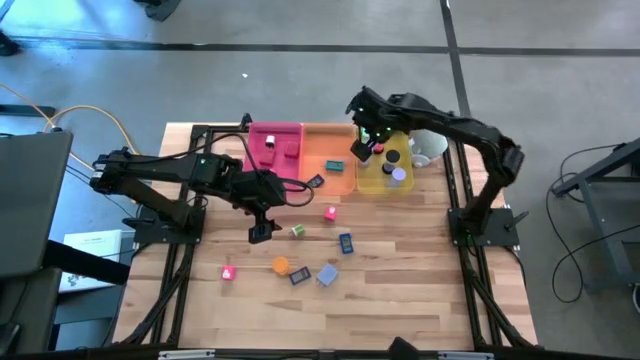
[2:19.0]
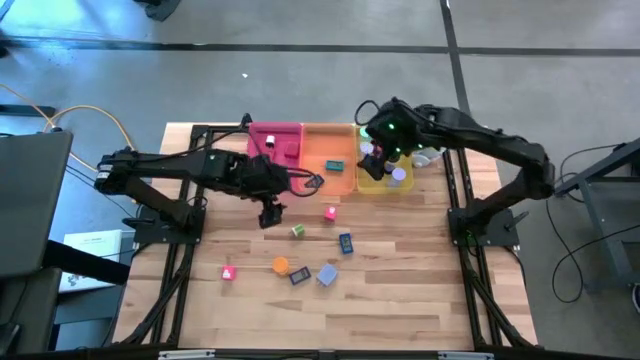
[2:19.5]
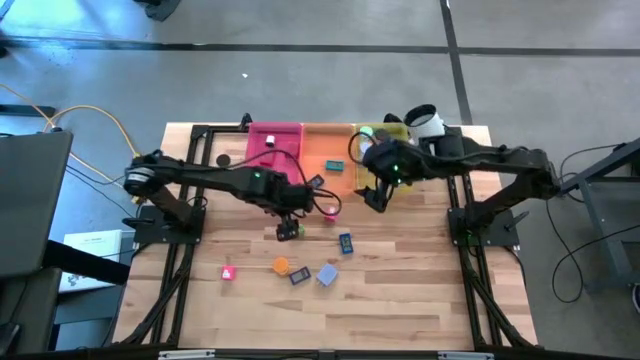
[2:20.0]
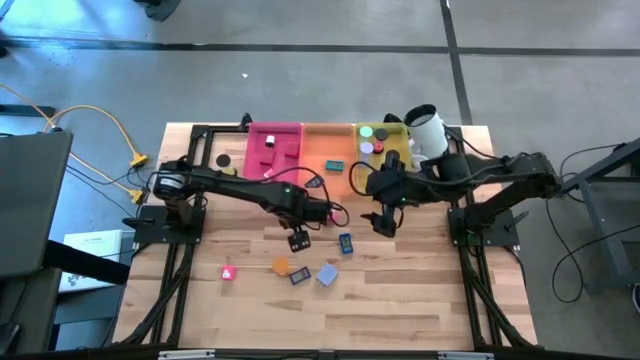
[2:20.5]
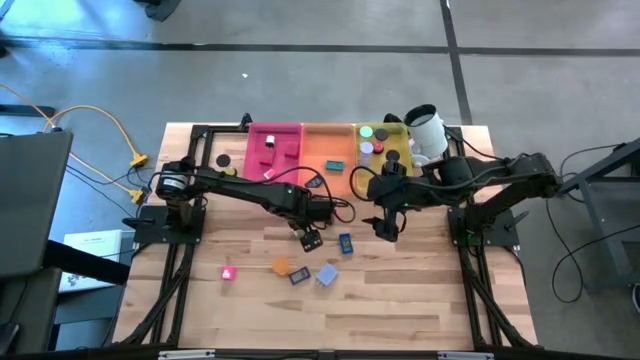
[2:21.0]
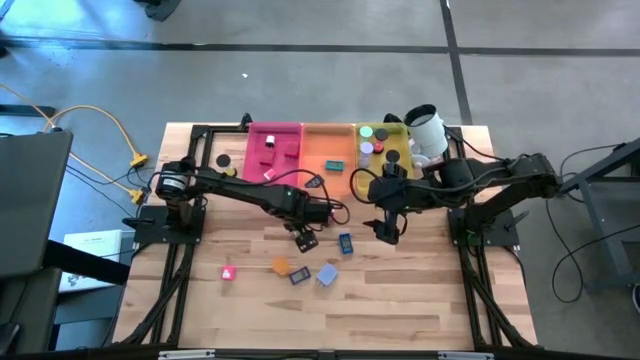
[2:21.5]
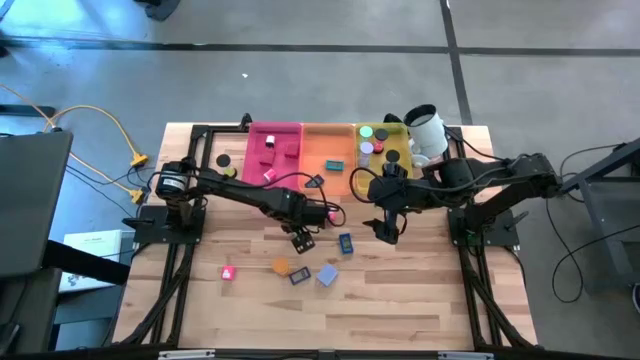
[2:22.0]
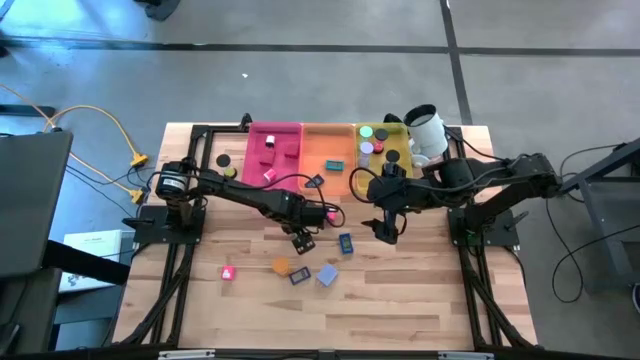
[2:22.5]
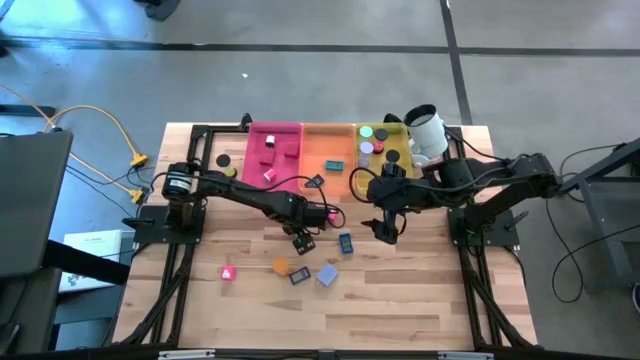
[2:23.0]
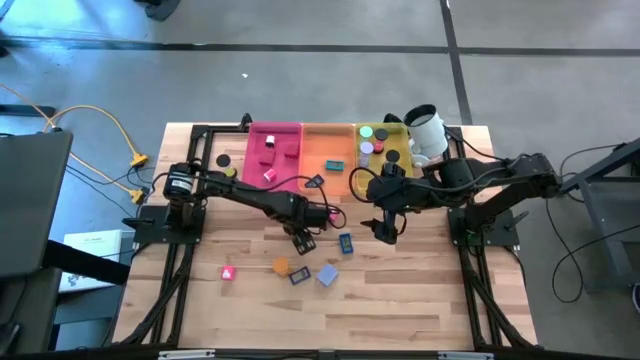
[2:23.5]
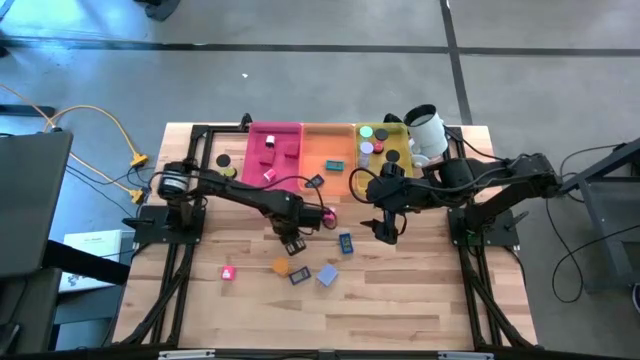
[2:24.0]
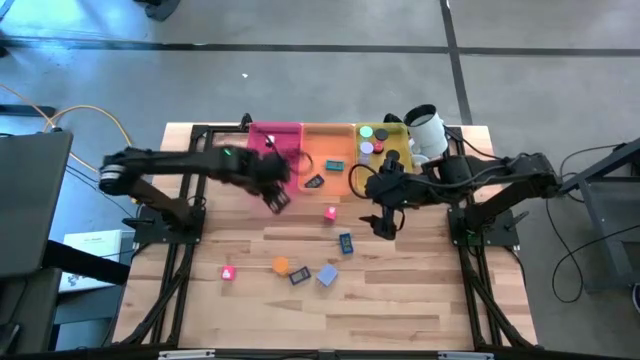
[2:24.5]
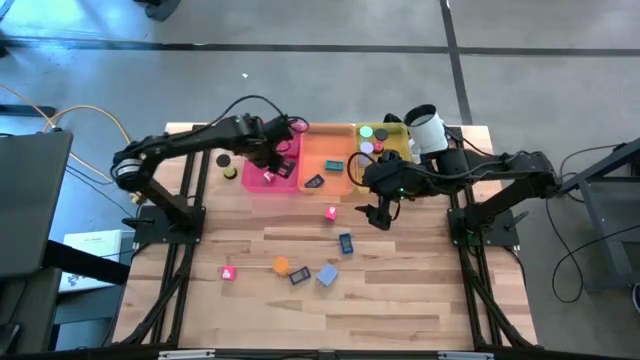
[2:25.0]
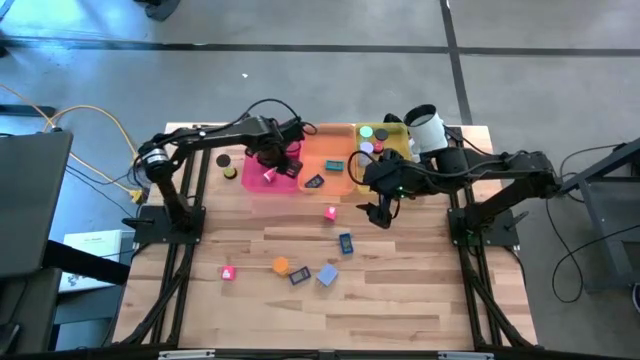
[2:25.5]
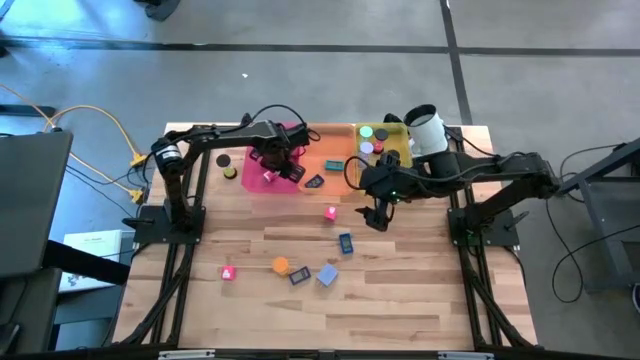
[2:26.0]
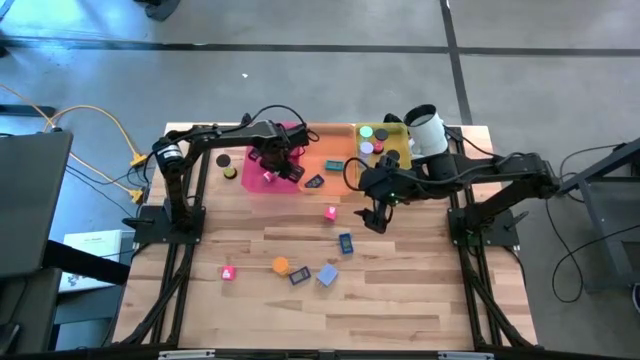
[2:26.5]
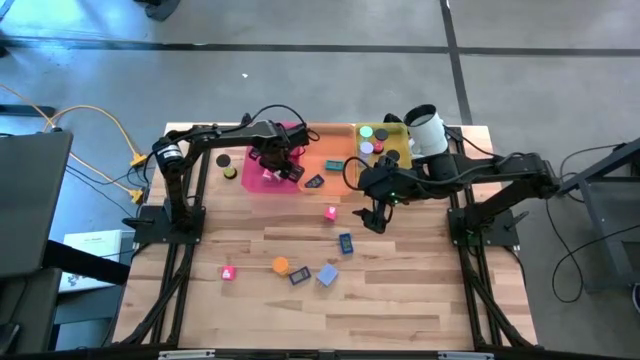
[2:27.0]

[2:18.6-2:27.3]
Task: Pick & Place Office items
Put the green charger adapter into the pink bin

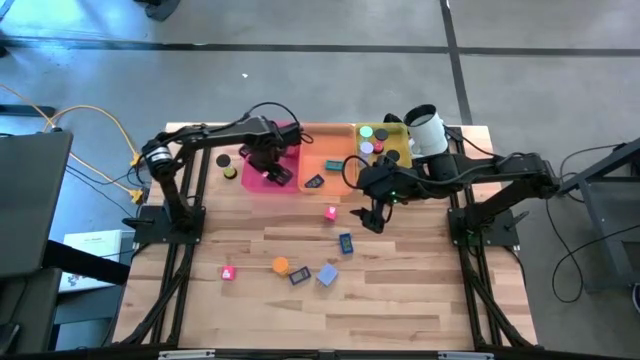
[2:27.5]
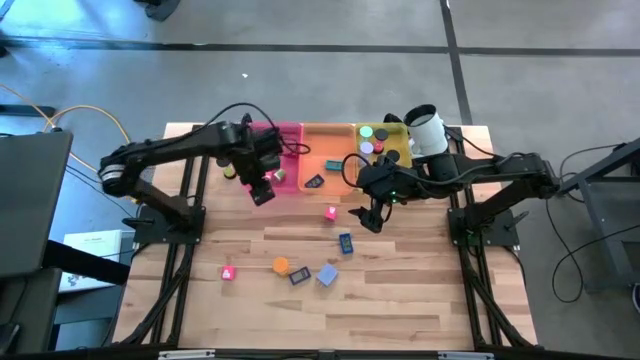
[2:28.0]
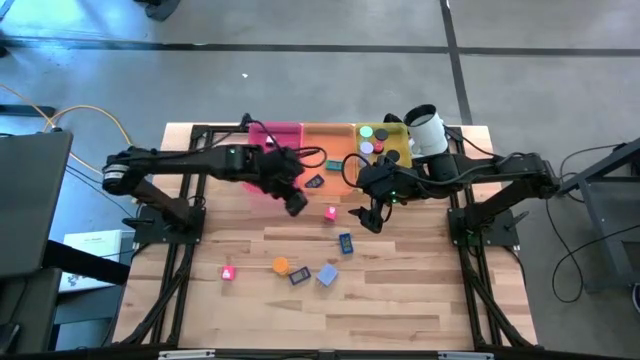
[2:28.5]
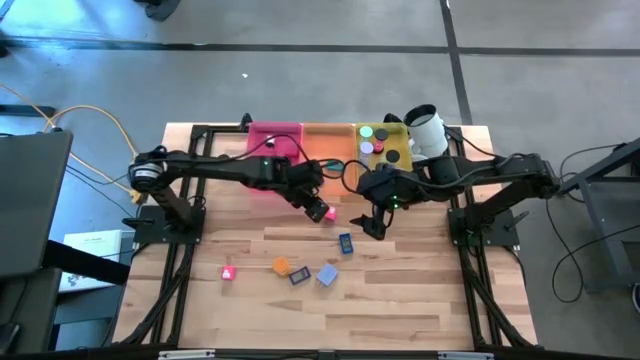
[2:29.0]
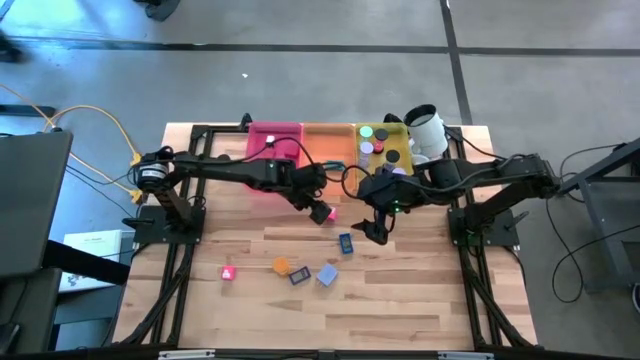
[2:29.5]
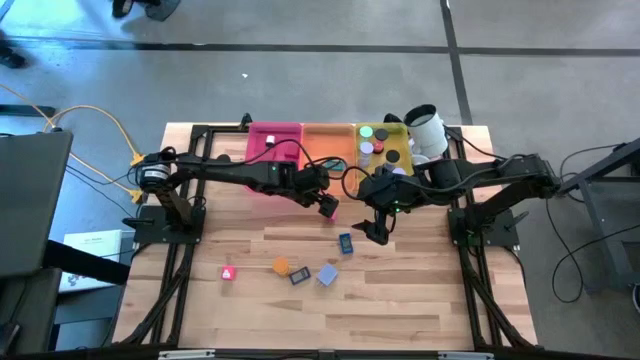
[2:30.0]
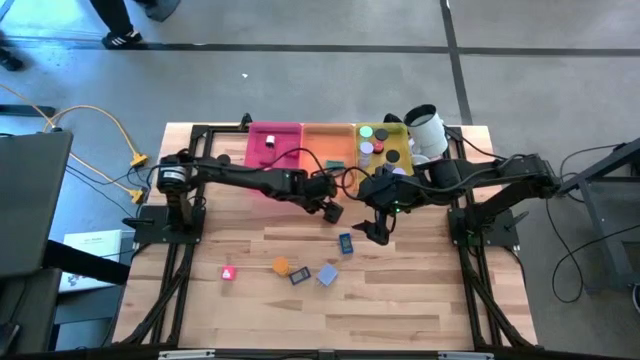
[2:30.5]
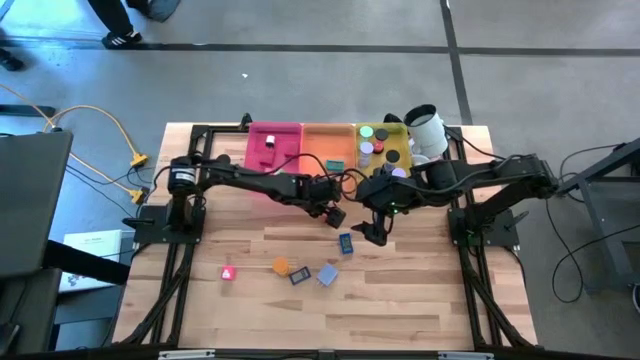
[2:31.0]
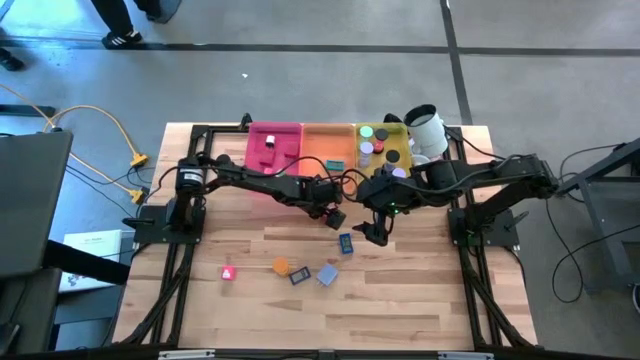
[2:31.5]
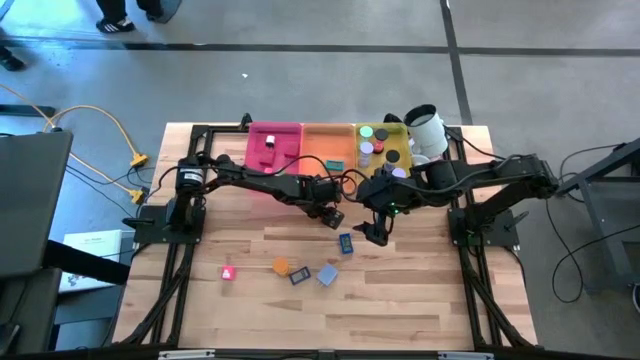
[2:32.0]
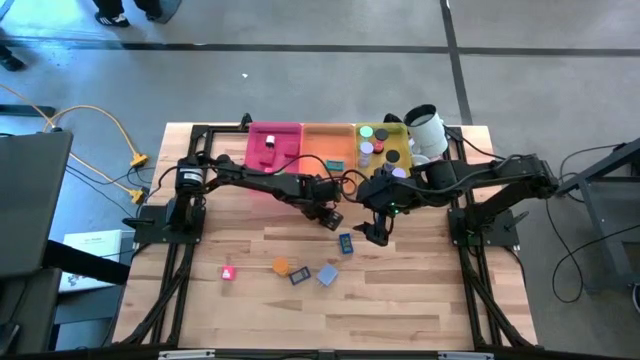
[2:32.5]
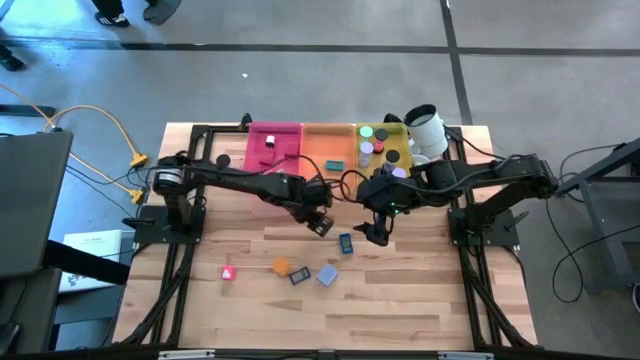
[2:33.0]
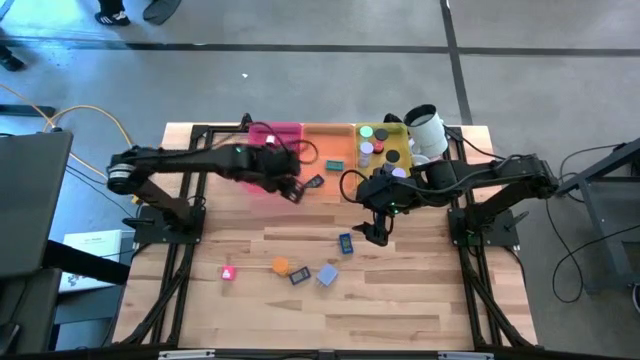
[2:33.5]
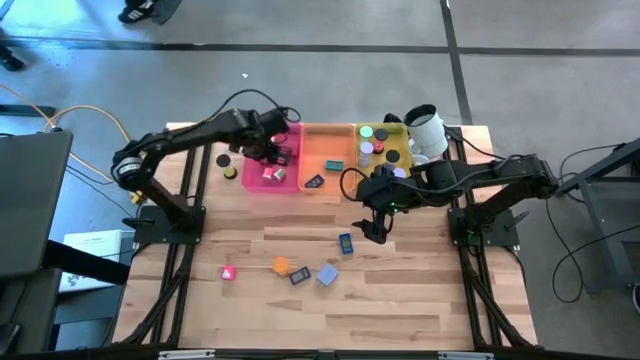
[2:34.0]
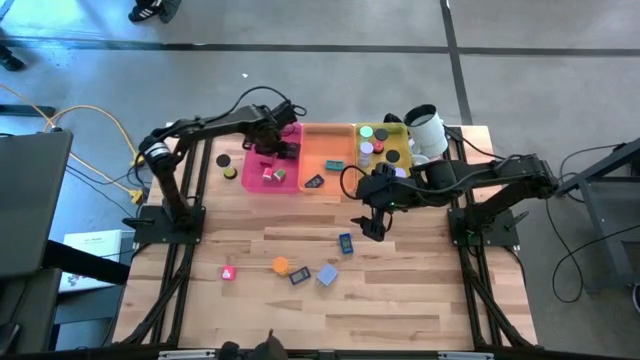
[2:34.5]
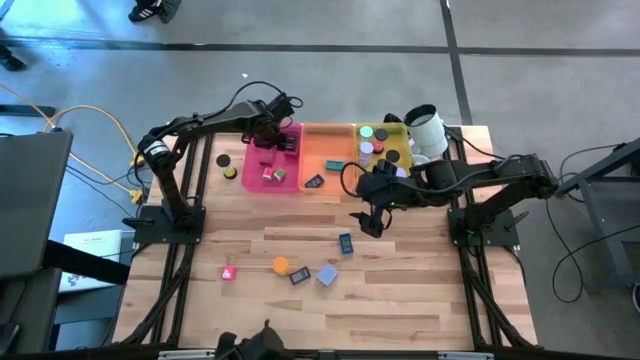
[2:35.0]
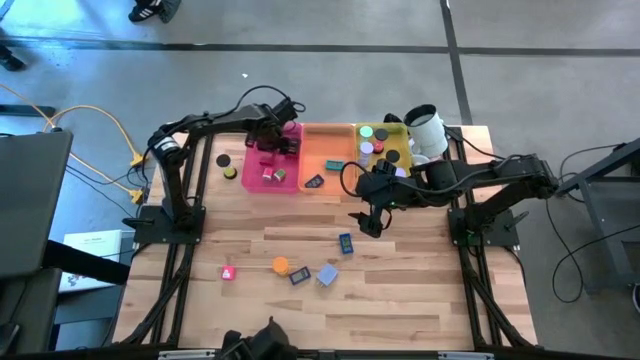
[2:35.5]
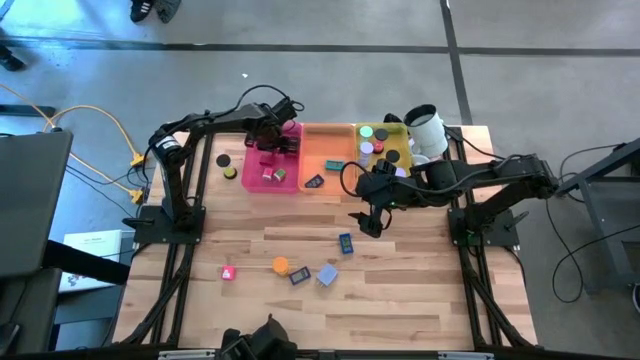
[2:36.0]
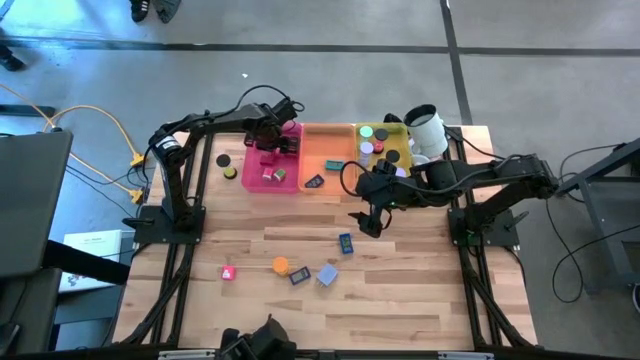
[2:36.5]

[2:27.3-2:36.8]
Put the right pink charger adapter into the pink bin

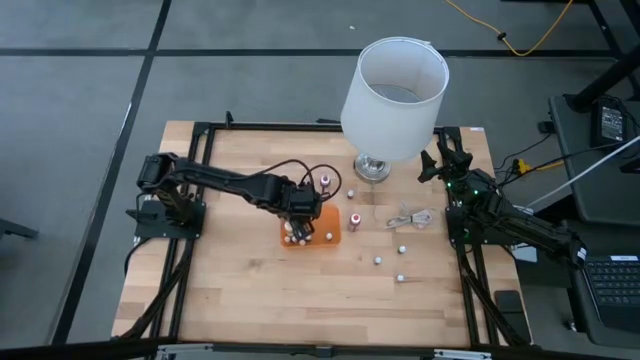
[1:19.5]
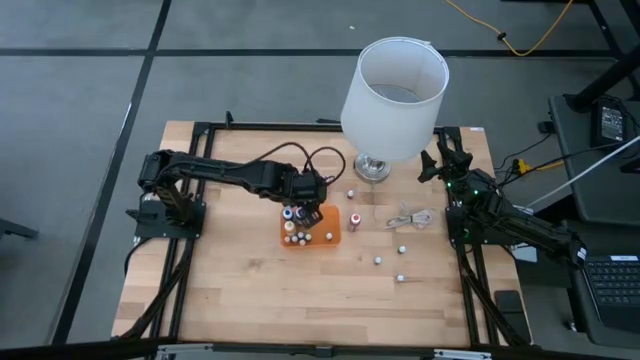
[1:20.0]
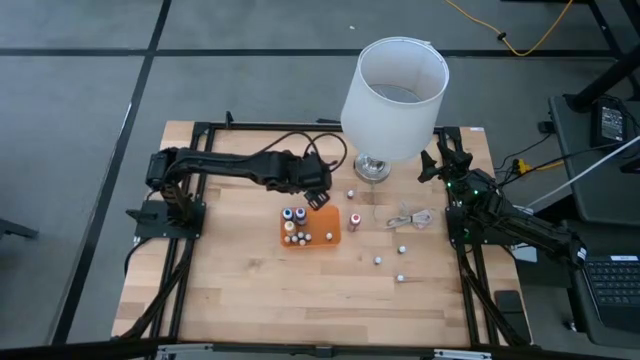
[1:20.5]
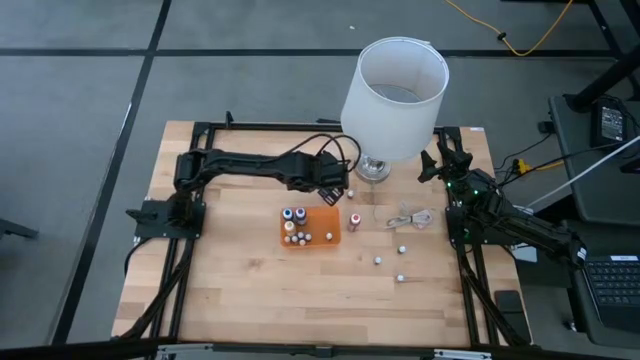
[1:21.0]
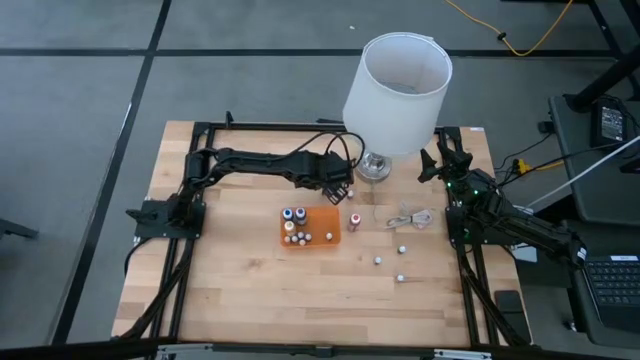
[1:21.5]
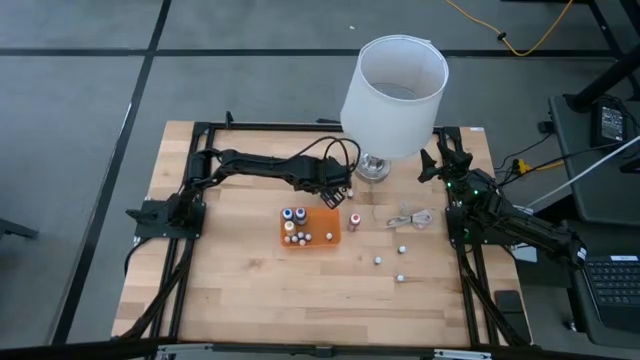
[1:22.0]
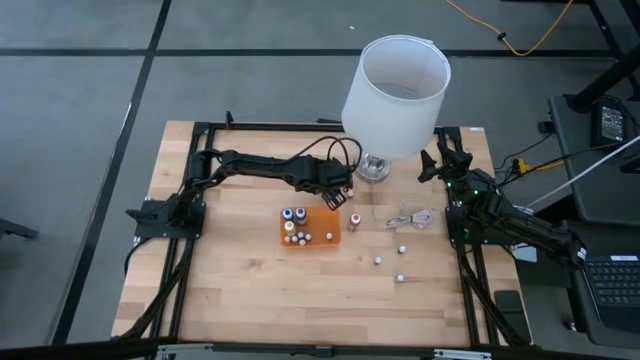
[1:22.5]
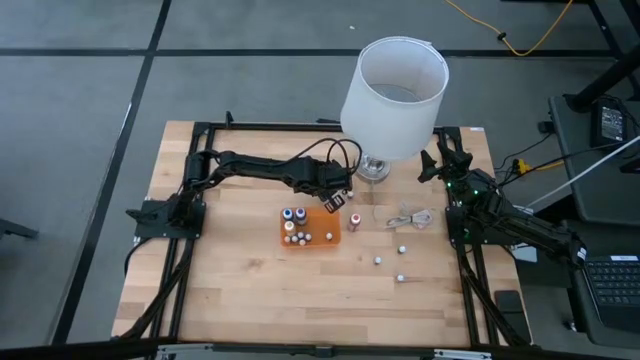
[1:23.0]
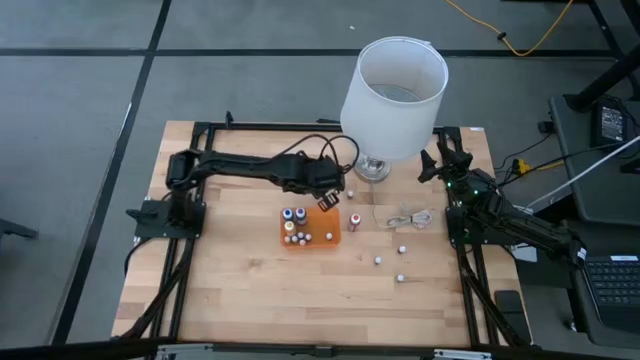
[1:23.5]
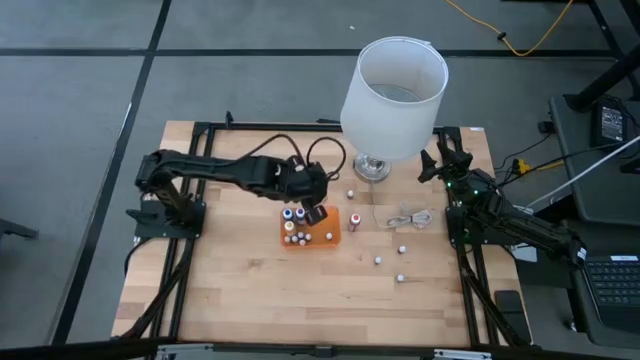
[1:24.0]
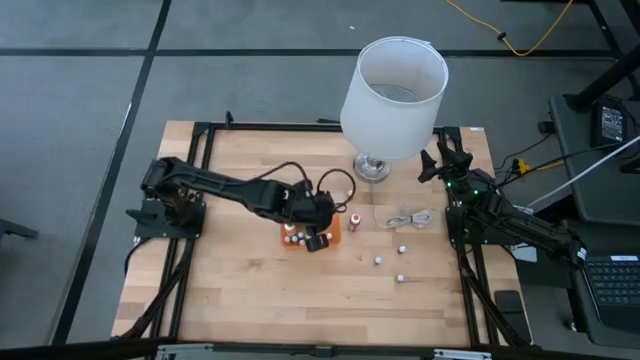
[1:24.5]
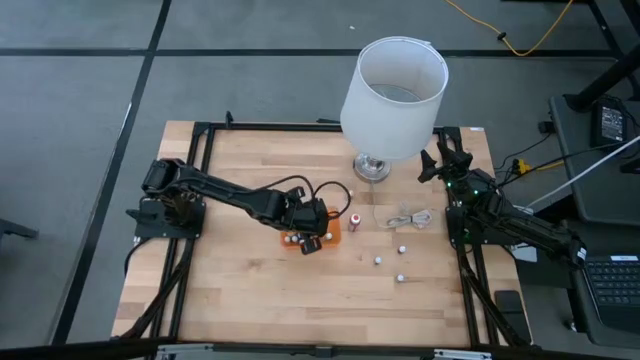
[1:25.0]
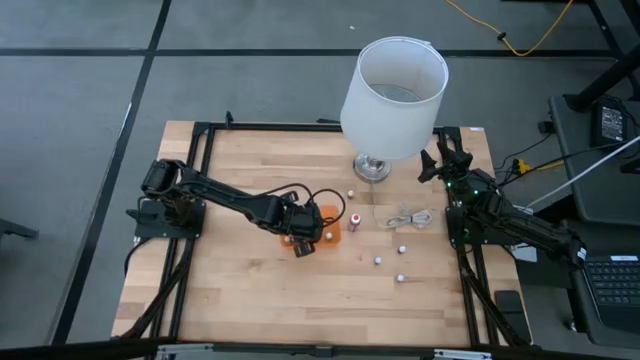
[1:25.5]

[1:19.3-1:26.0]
Task: Pick & Place food coloring
Put the big pink food coloring bottle into the orange transparent bin
